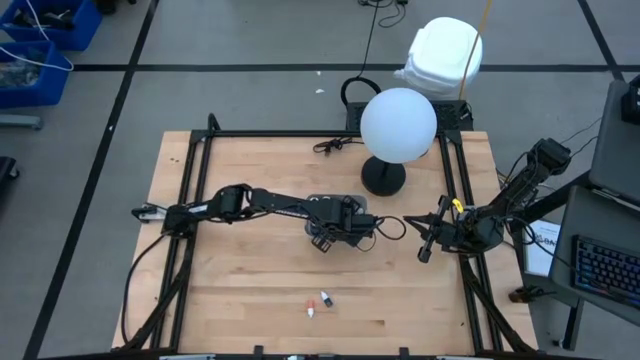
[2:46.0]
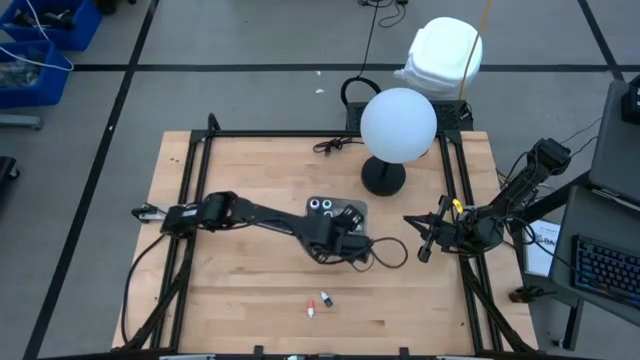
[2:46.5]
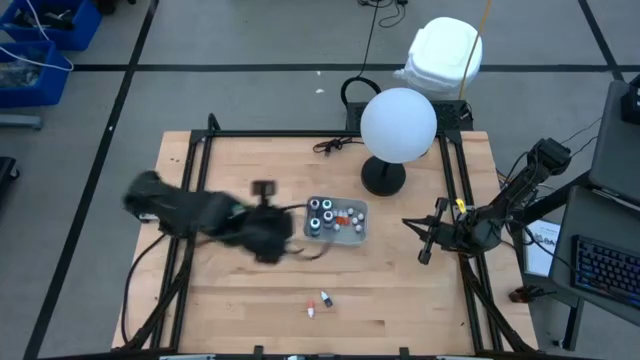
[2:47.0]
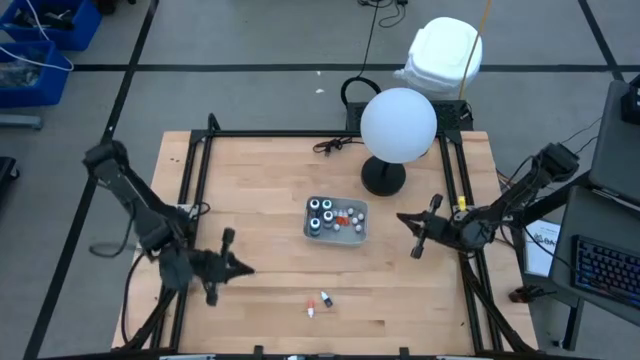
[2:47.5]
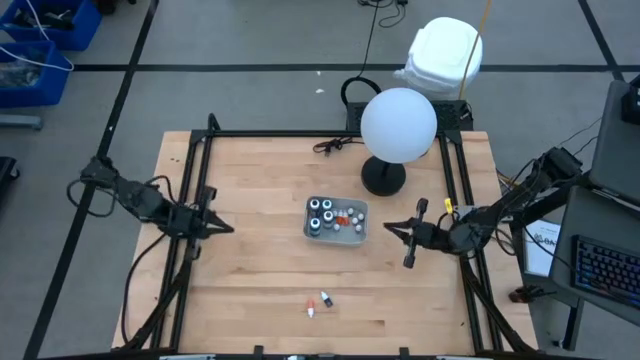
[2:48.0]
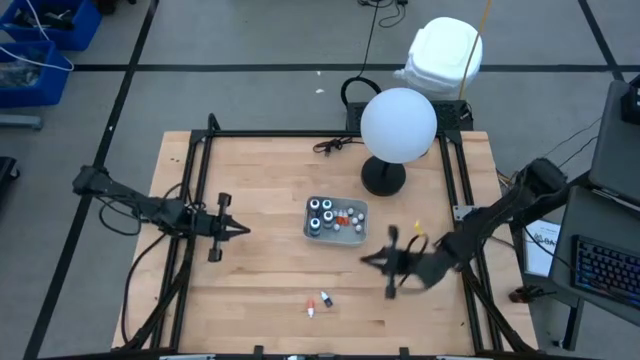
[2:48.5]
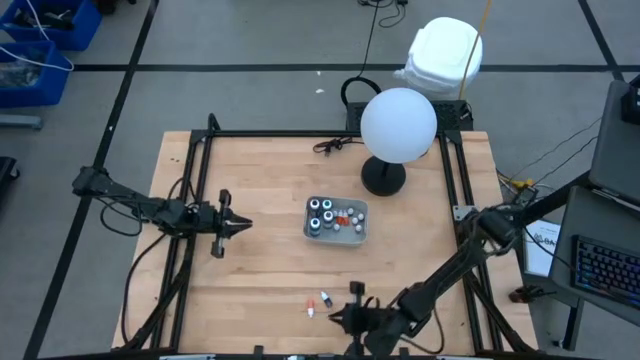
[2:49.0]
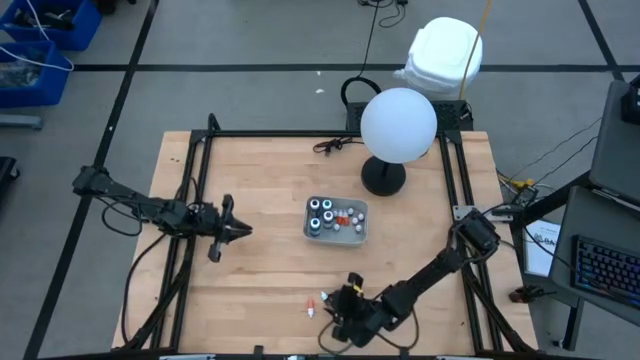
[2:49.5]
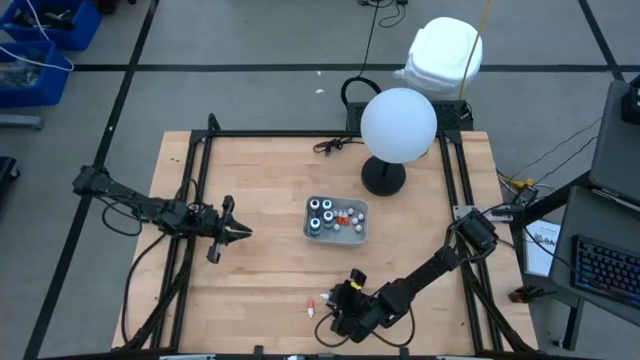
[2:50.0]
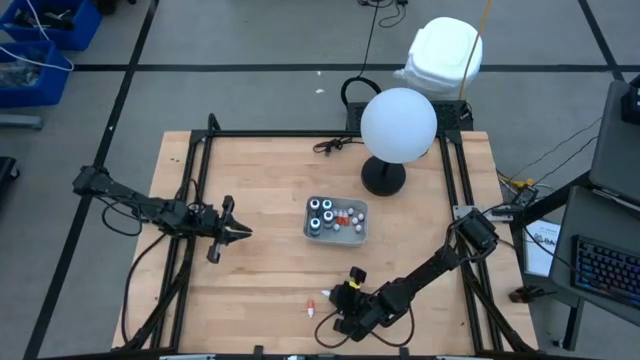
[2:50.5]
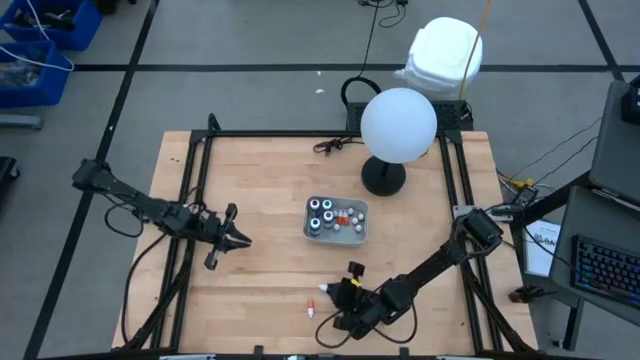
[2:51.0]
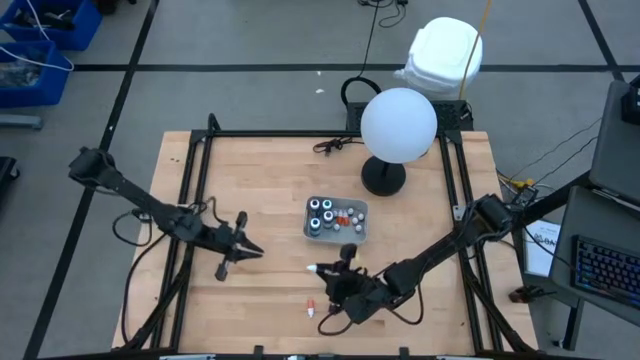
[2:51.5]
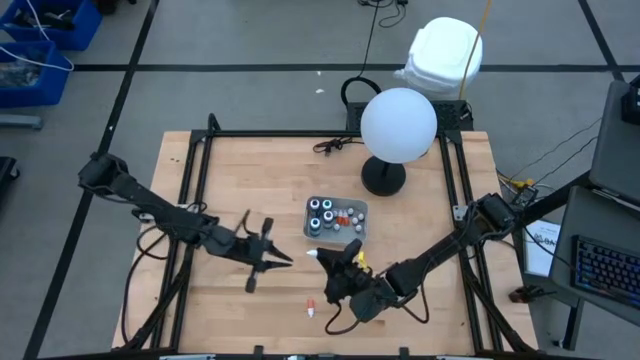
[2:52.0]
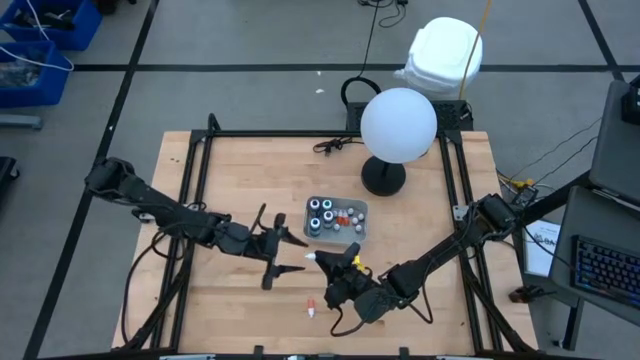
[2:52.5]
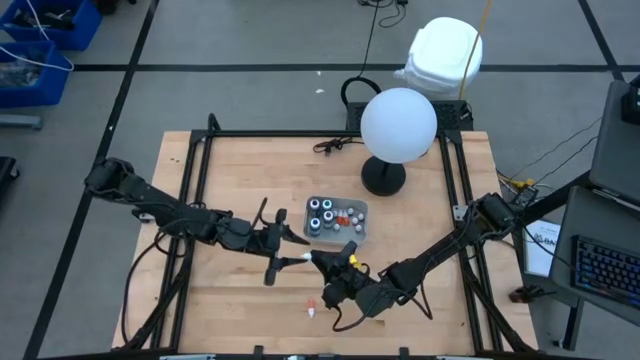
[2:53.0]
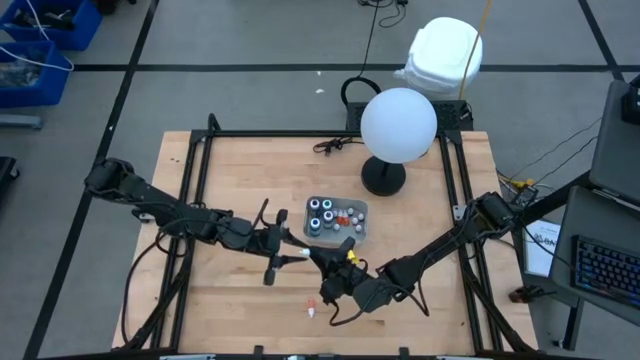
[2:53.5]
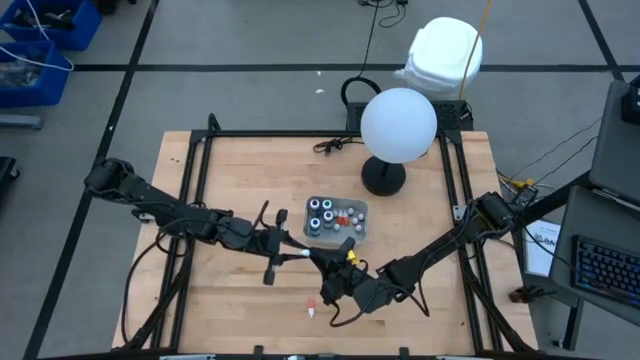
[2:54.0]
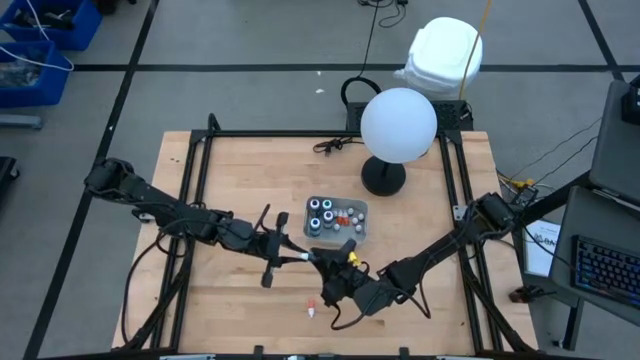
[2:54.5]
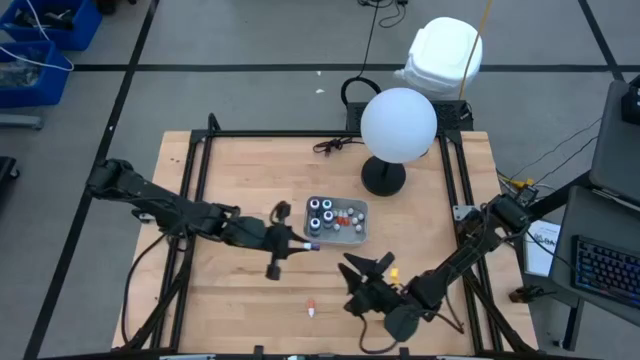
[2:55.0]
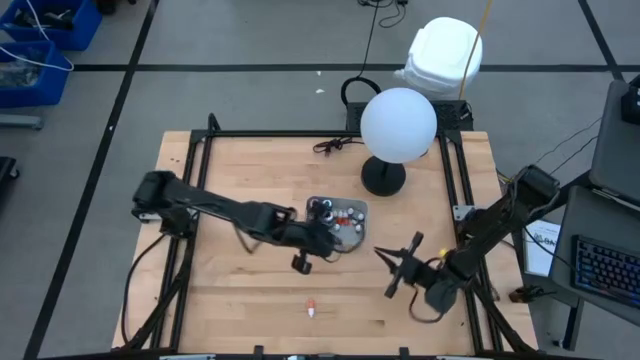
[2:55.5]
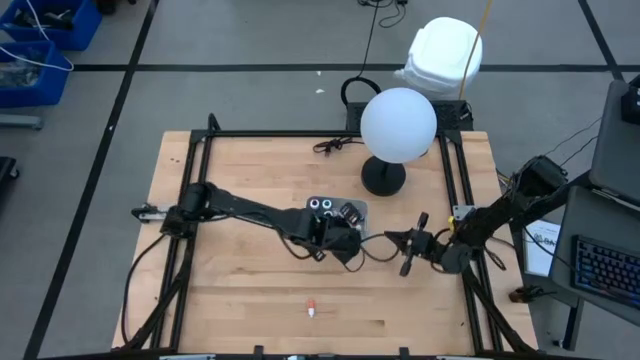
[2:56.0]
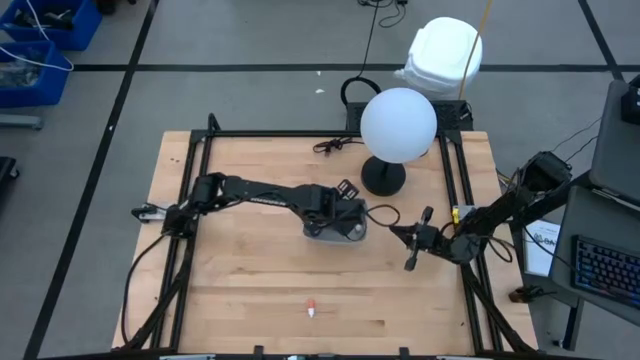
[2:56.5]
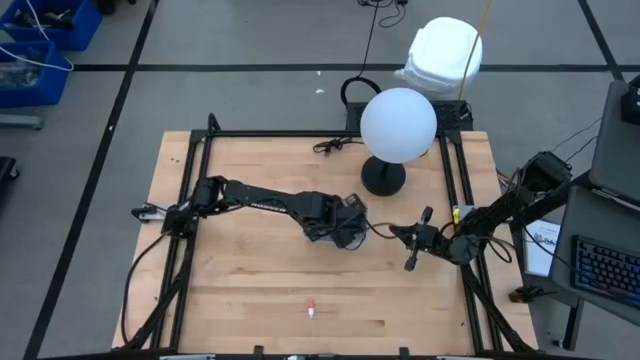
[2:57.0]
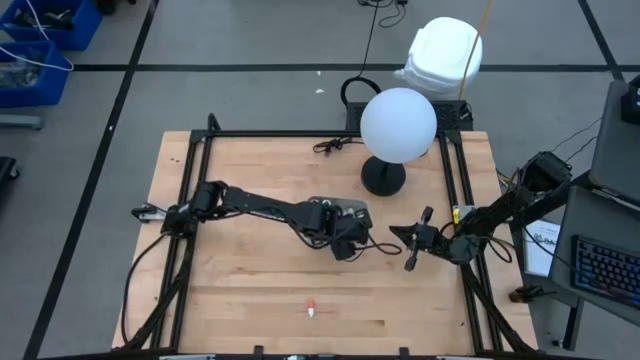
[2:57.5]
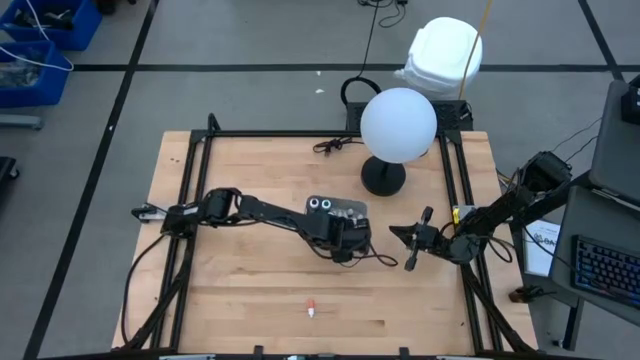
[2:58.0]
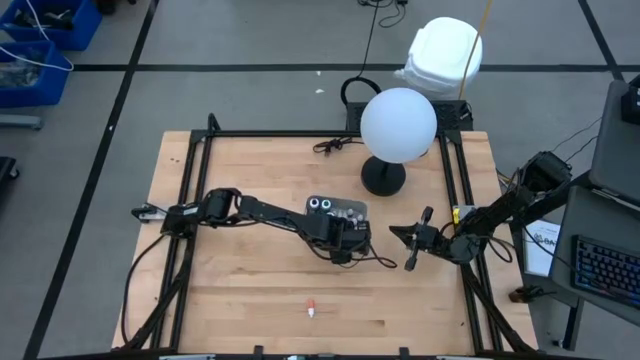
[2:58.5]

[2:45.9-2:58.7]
Task: Pick & Place food coloring
Put the small purple food coloring bottle into the gray bin

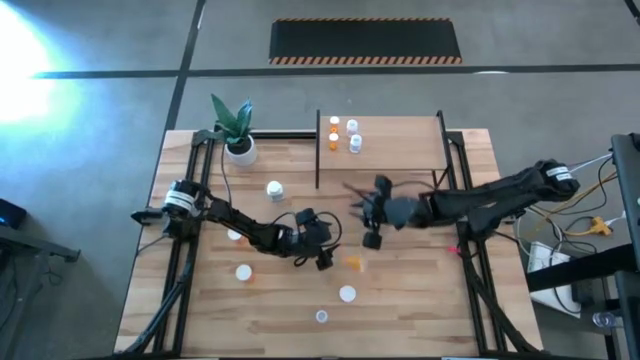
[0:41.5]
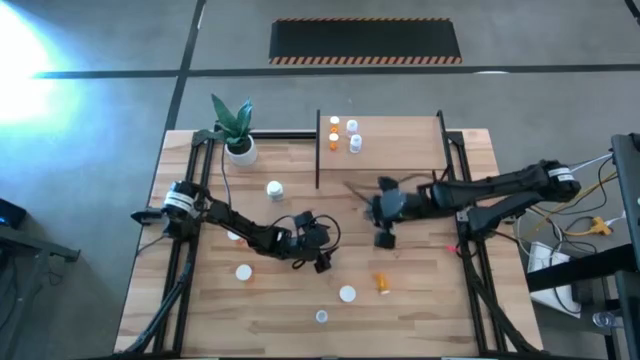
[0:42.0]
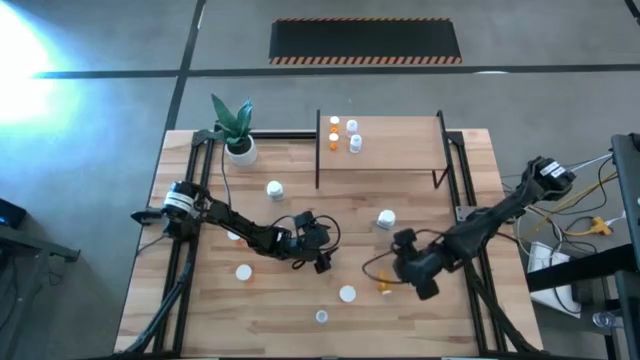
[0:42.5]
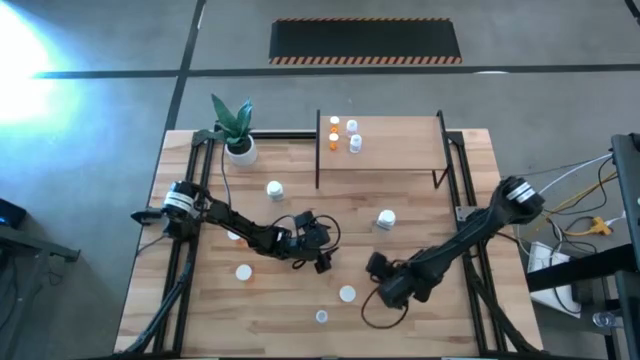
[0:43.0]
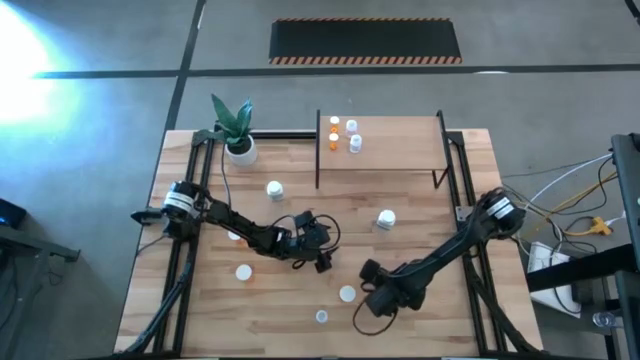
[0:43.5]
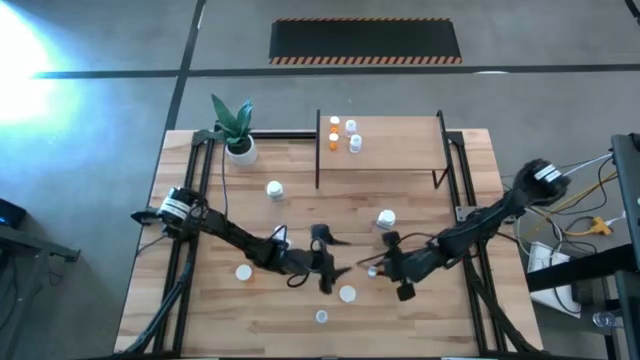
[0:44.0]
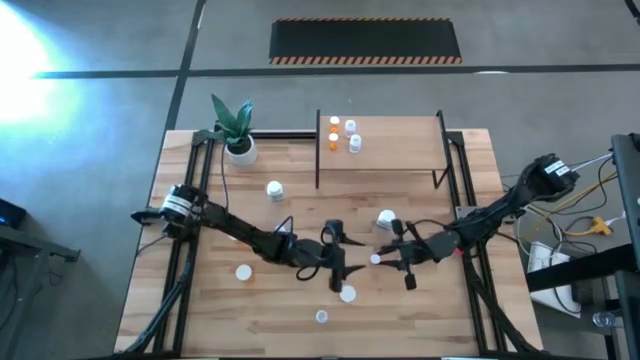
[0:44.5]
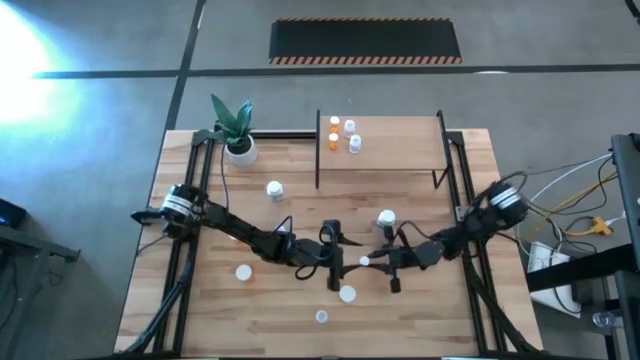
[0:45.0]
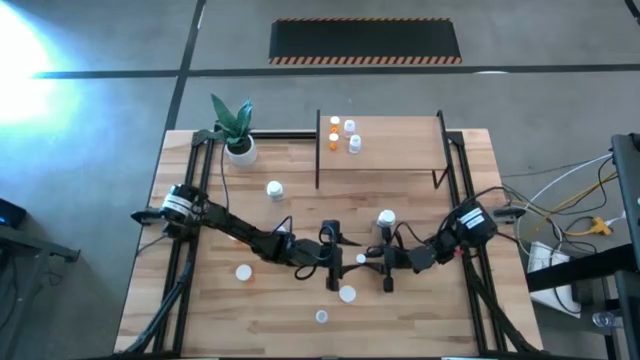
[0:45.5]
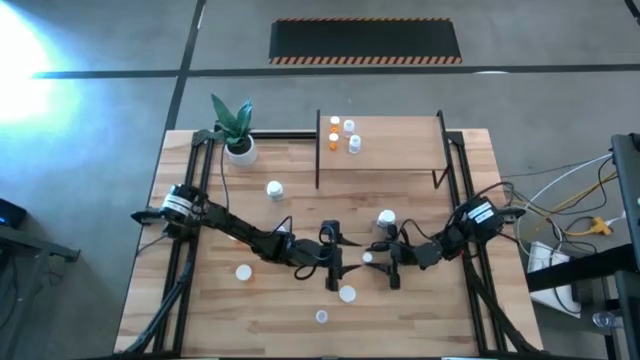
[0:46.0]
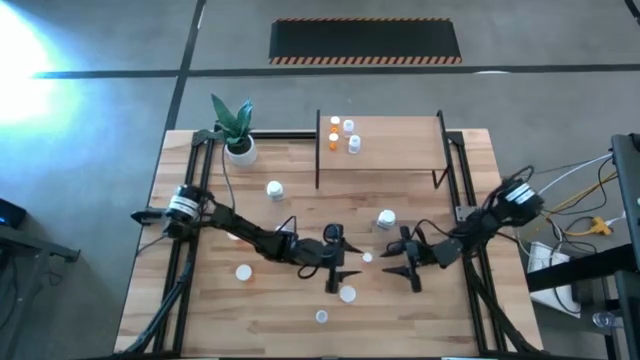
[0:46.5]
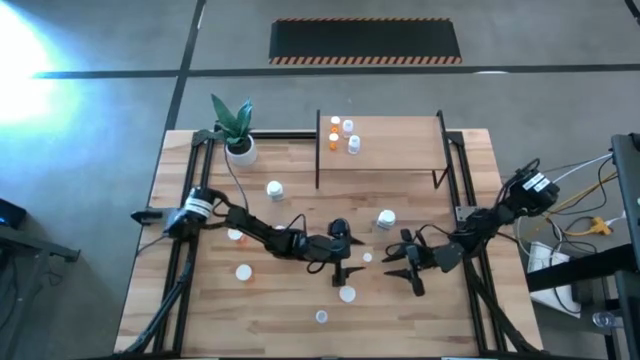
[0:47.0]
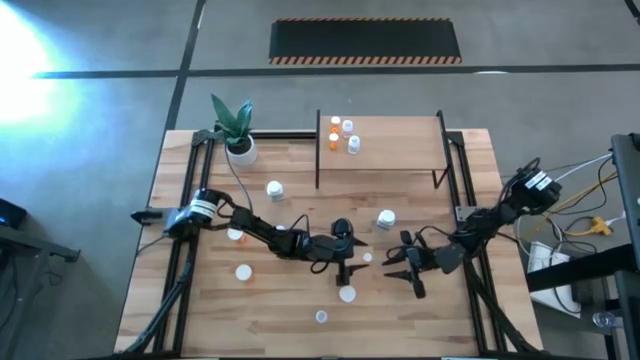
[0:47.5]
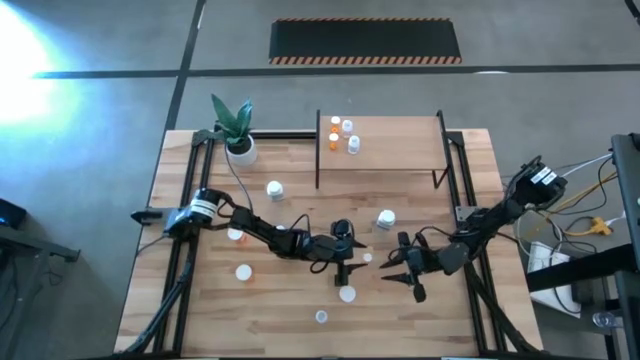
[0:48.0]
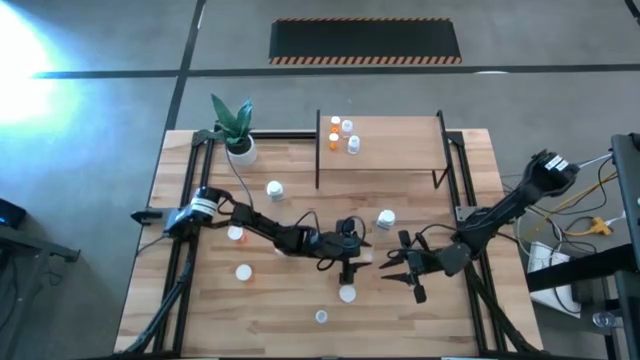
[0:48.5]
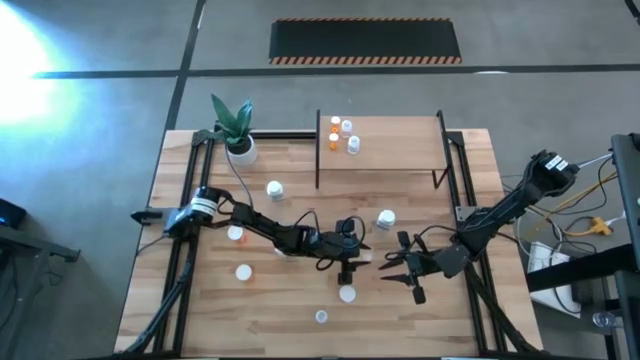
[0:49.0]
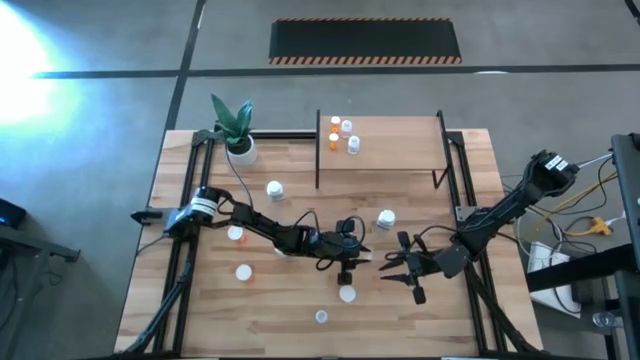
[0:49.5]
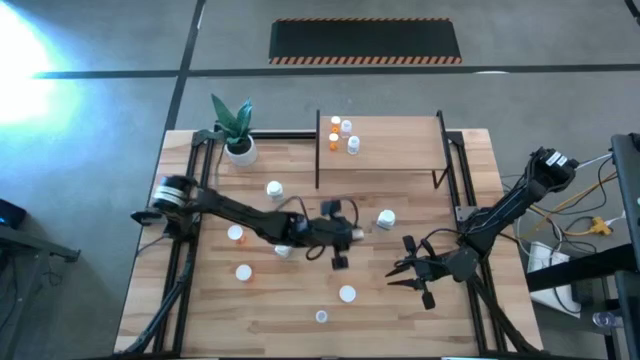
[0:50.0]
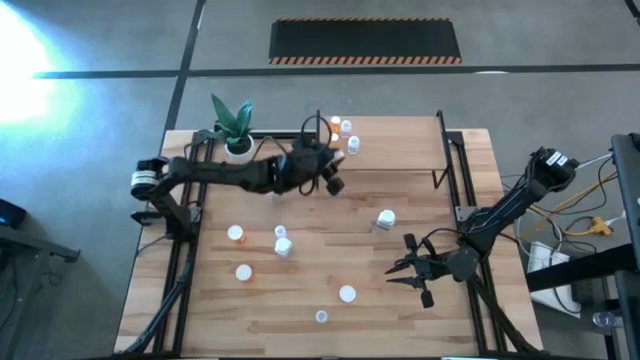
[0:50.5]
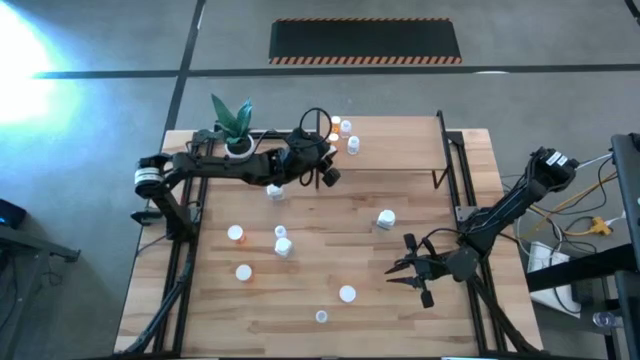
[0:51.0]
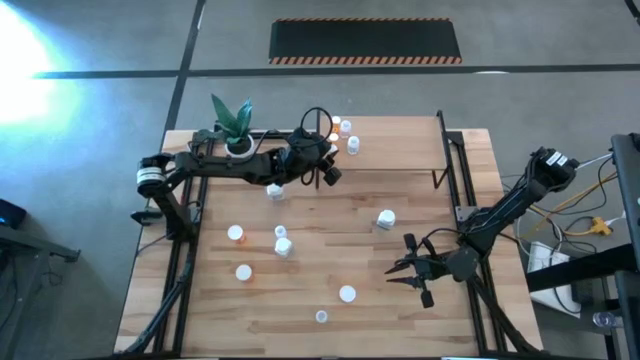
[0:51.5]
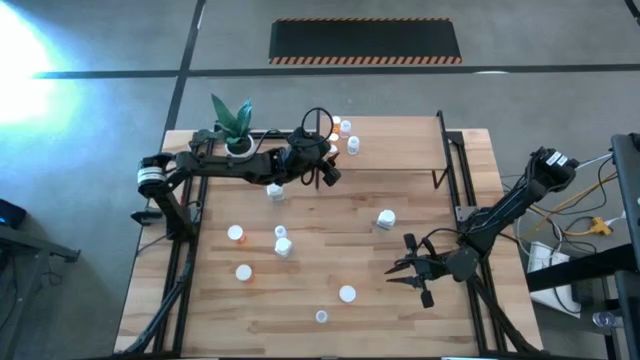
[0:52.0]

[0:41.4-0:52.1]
Task: Pick and place medicine bottles onto shelf by color
Put the small orange pill bottle on the shelf aligned with the other small orange pill bottles
